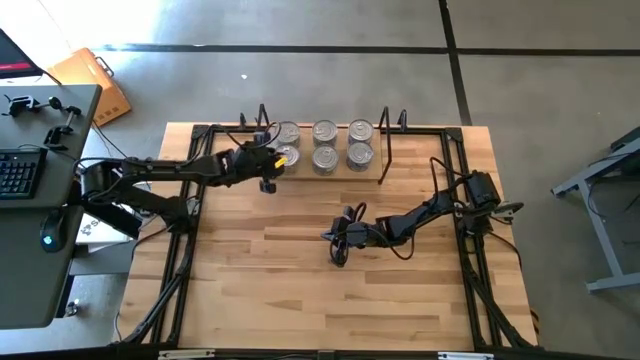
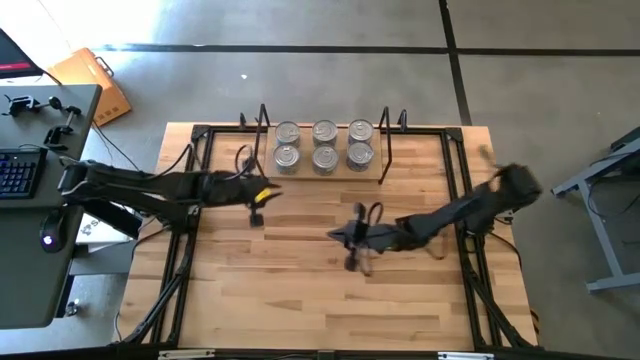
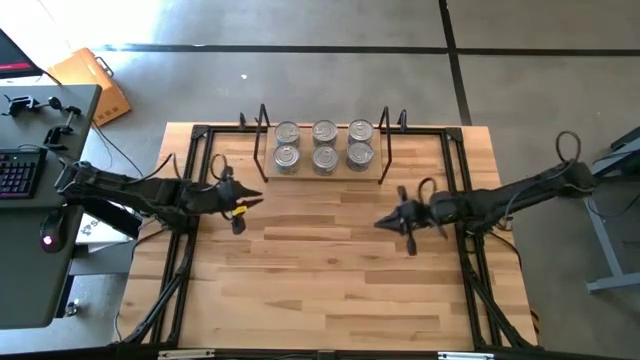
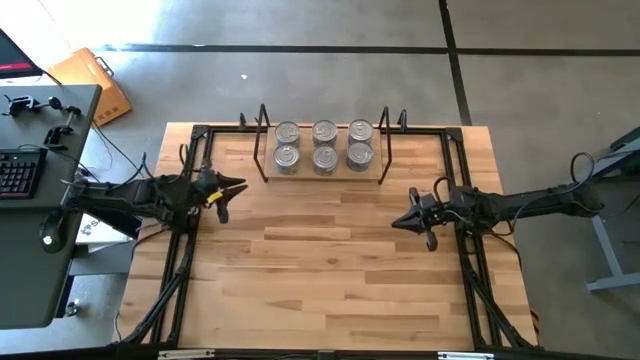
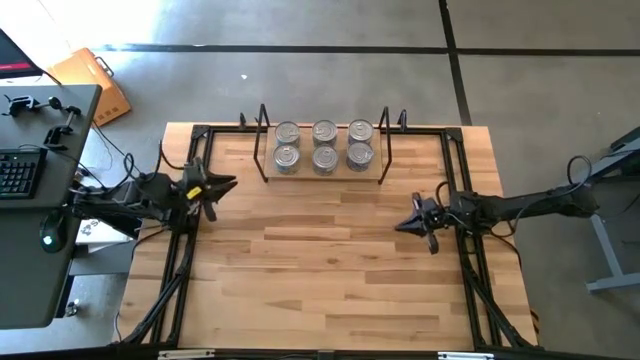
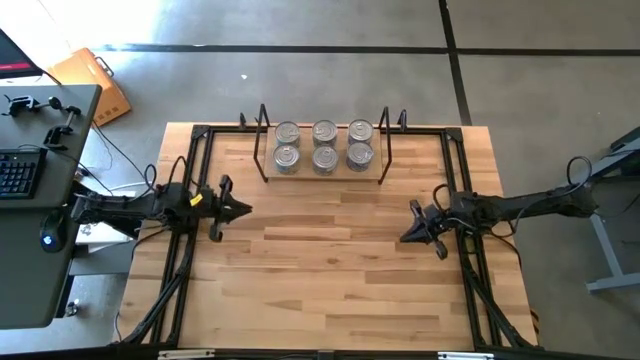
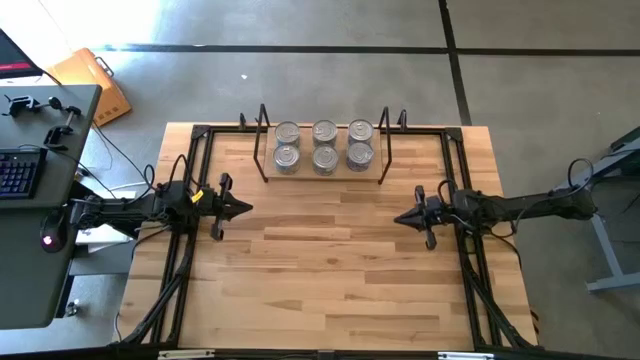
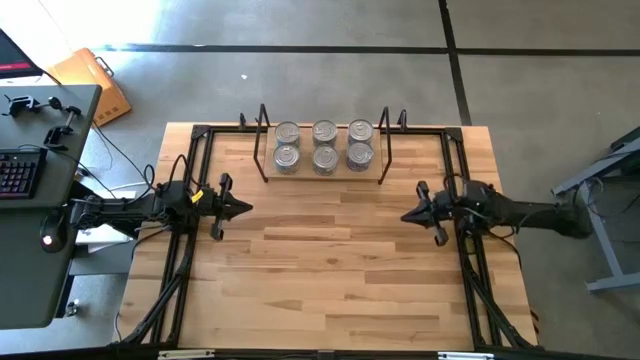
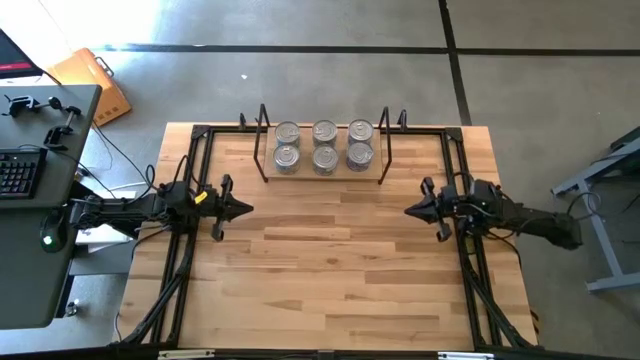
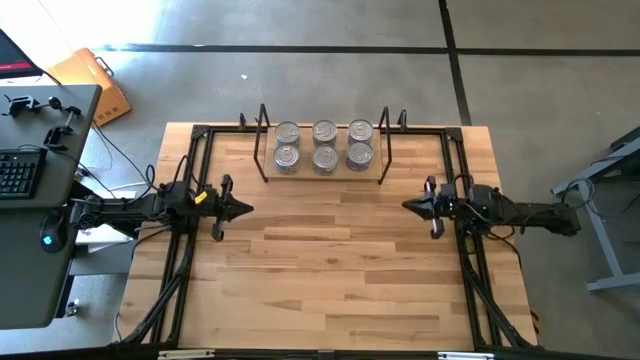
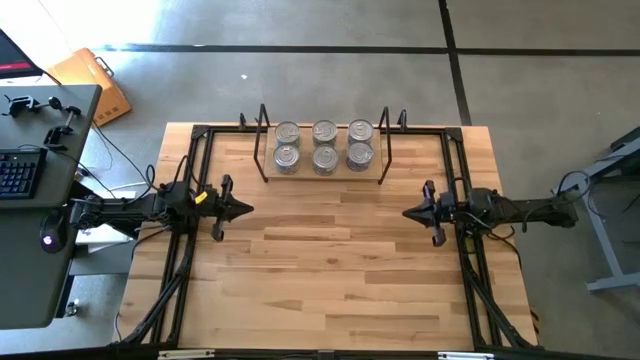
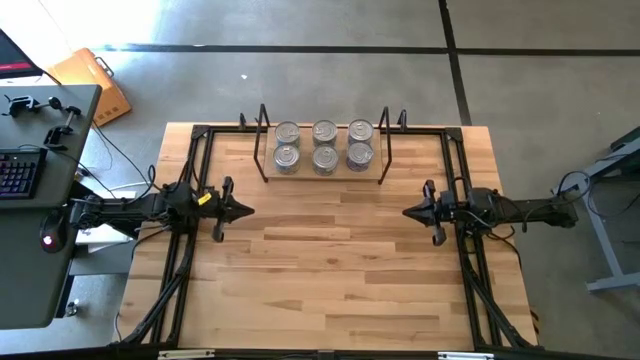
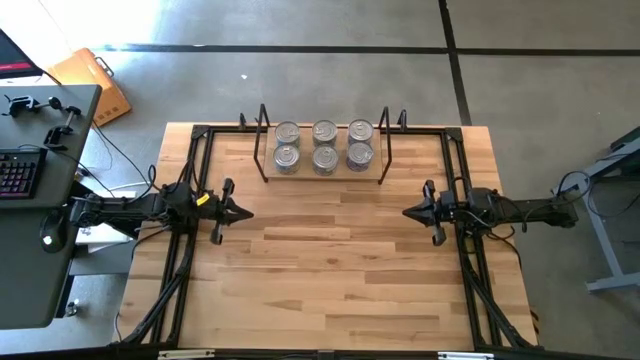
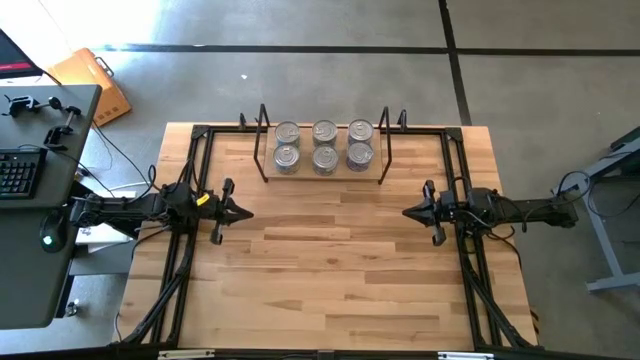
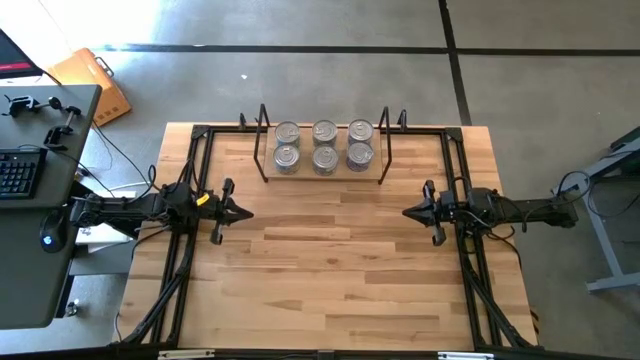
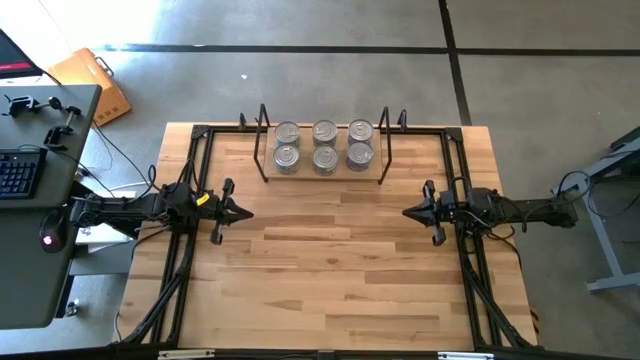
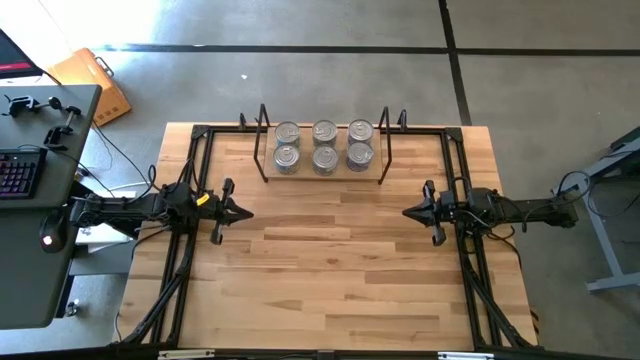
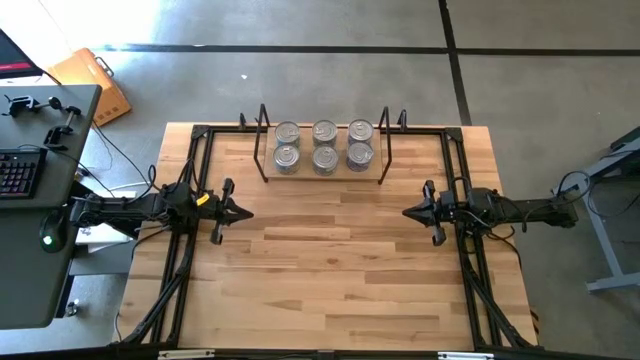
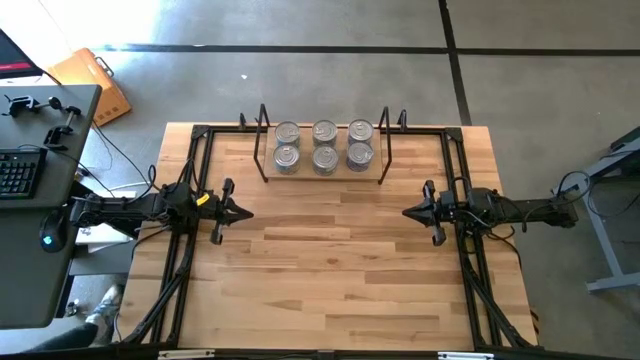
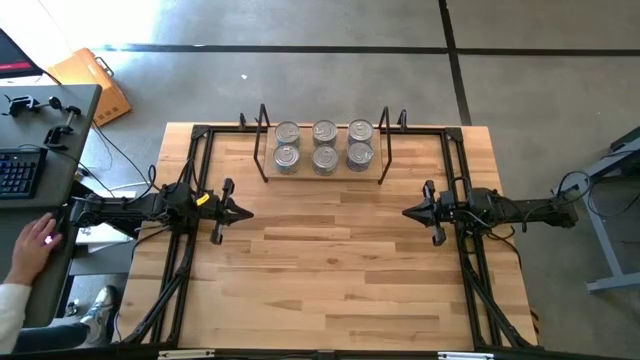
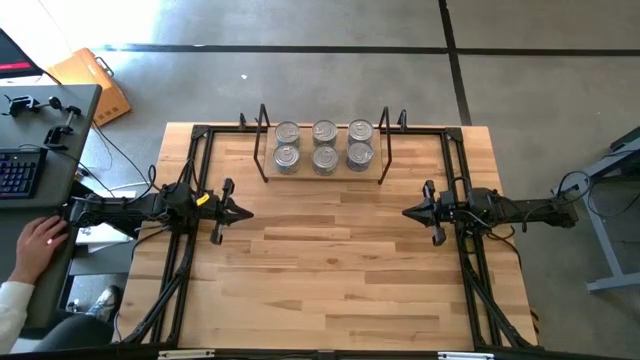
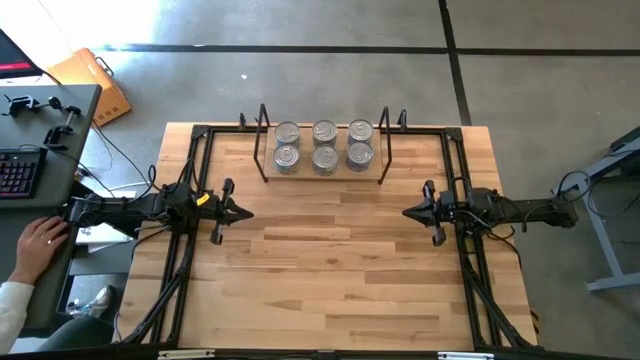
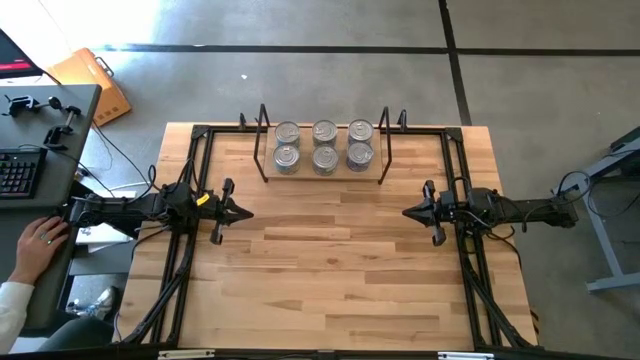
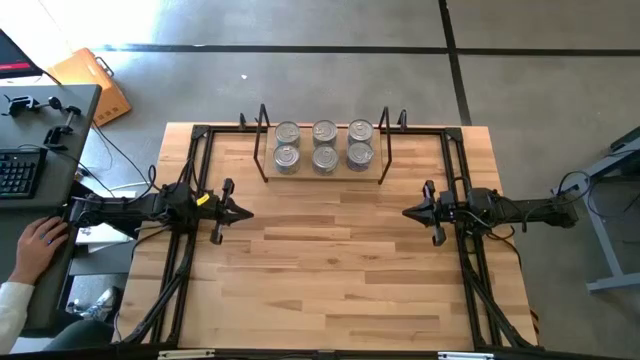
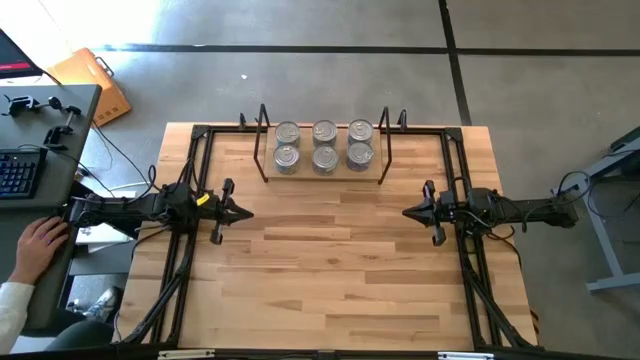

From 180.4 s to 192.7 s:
Task: Stack canned seafood by type on shelf
Return to Home Position

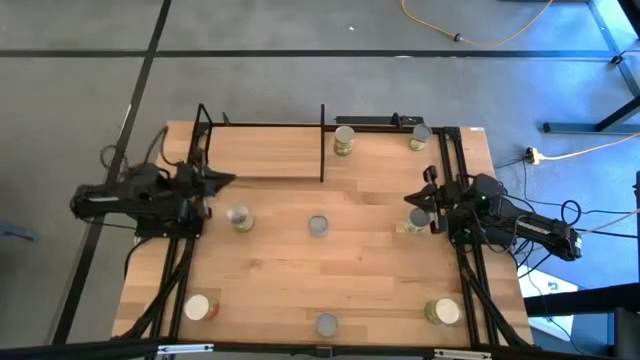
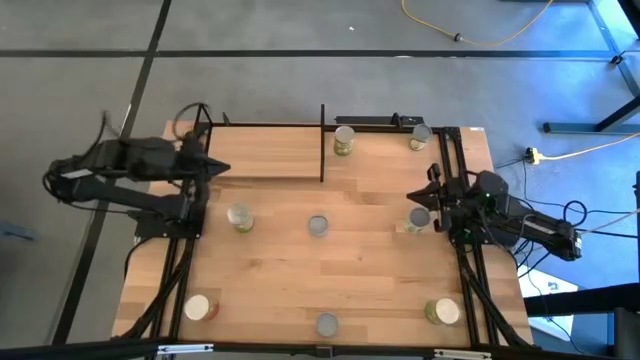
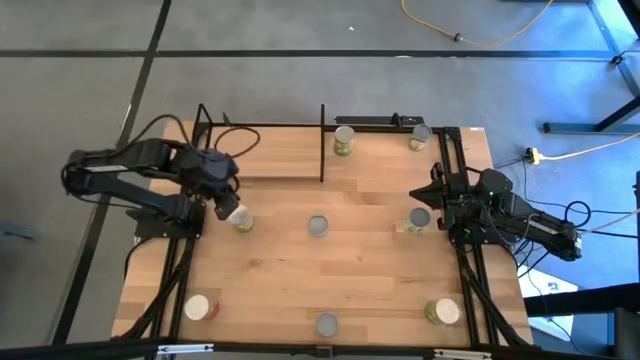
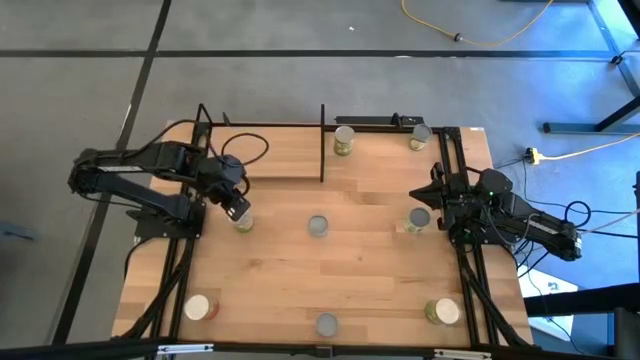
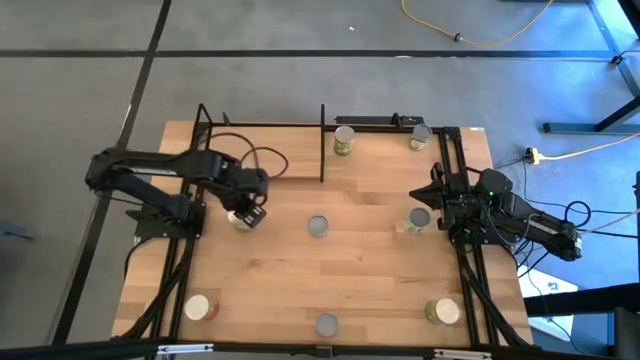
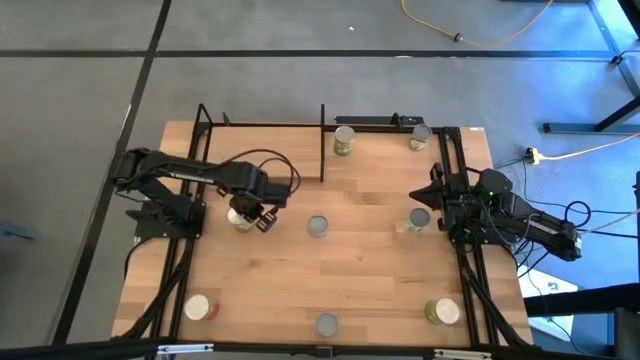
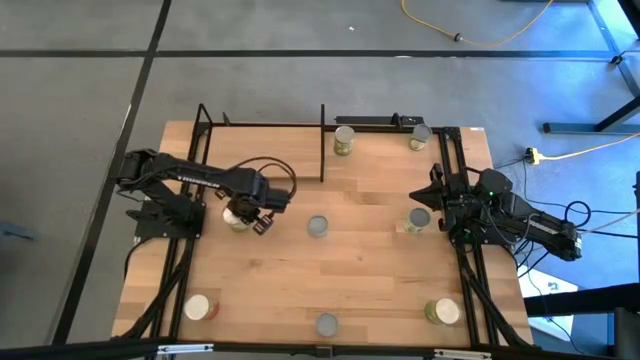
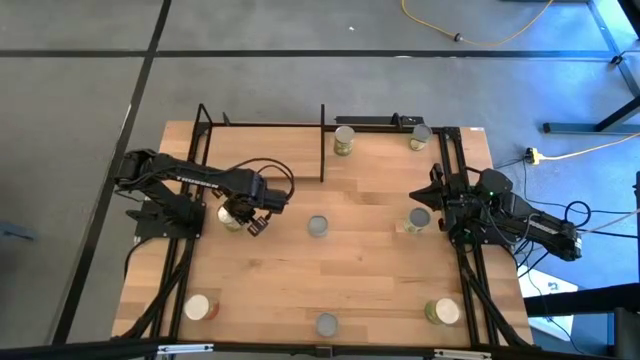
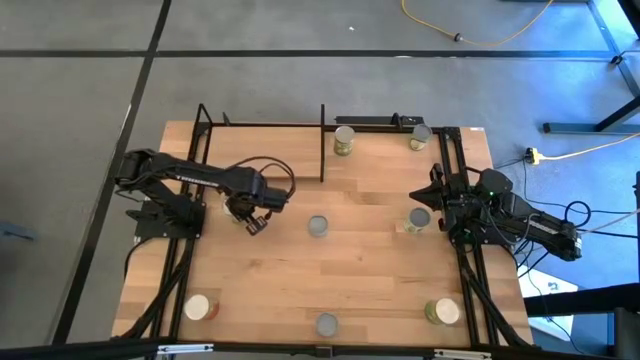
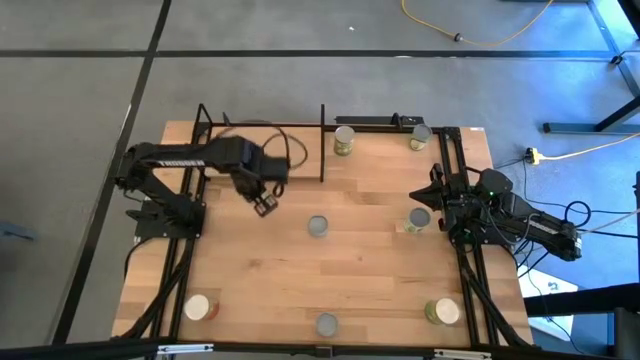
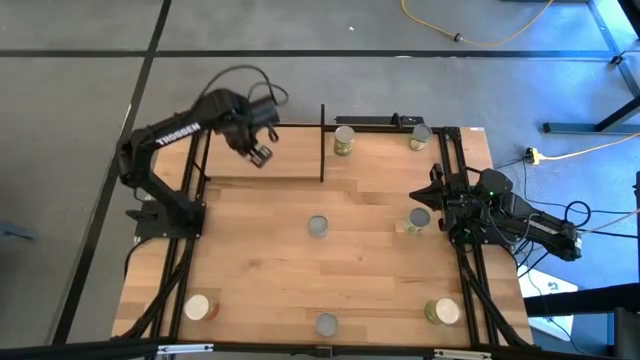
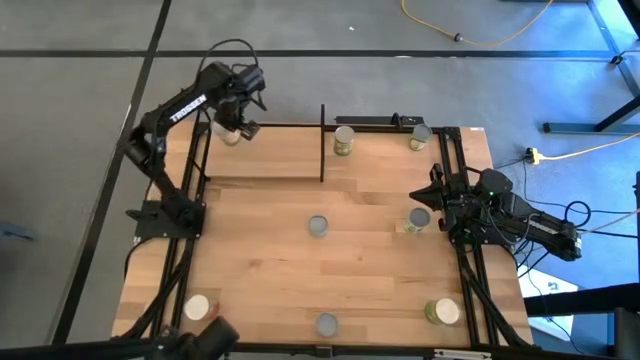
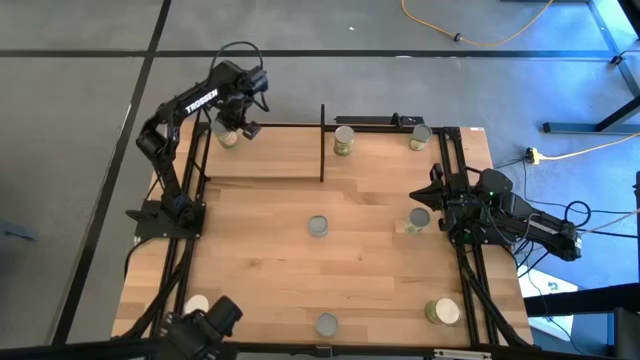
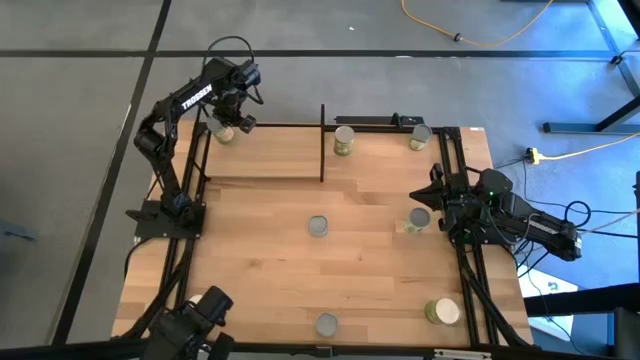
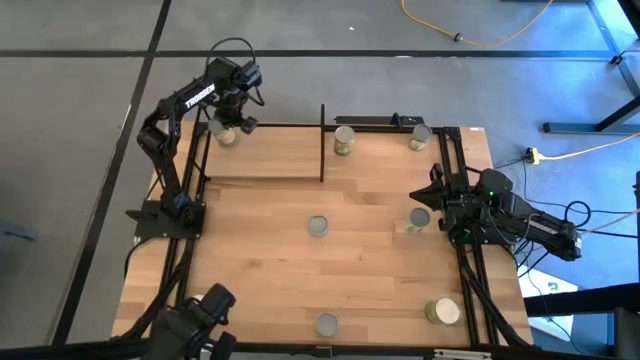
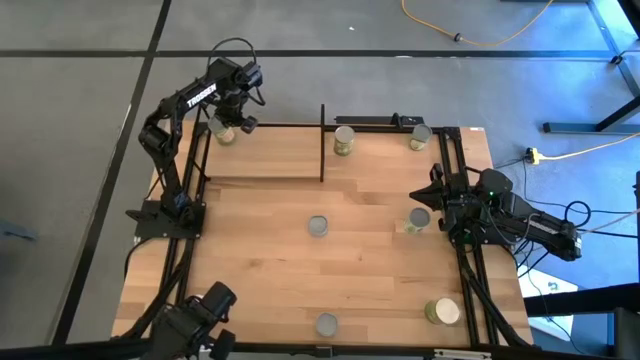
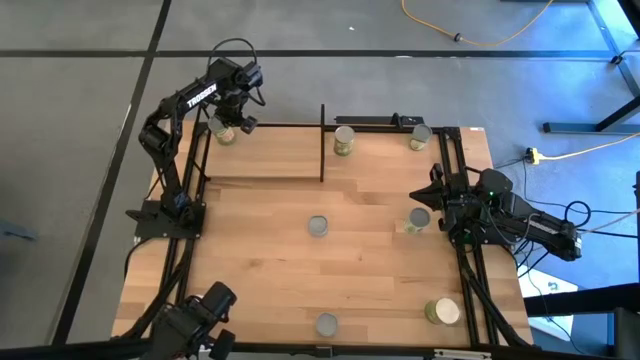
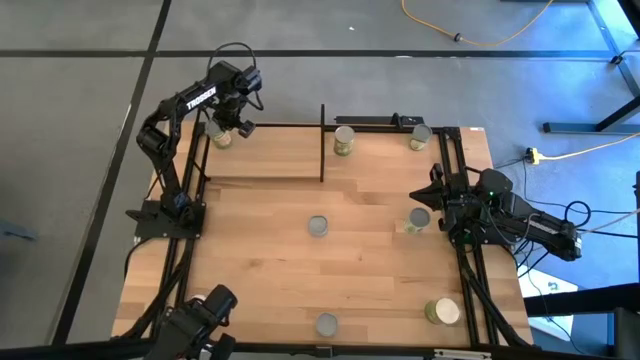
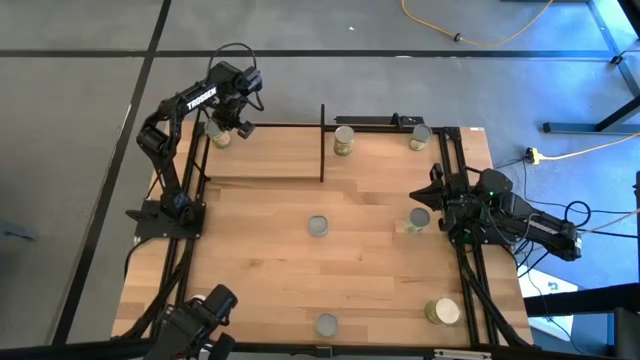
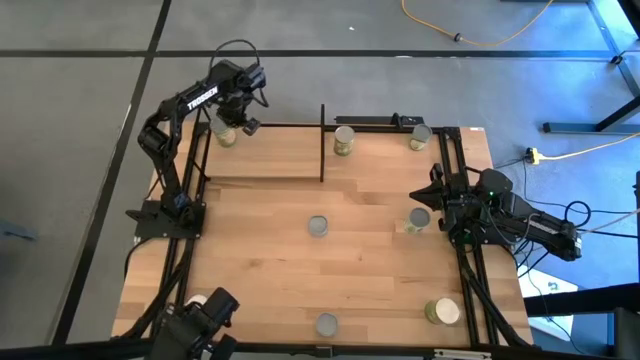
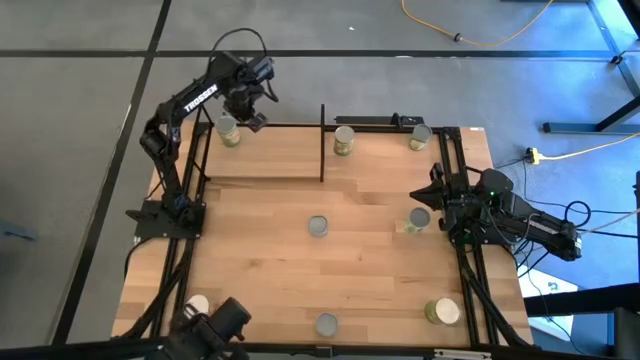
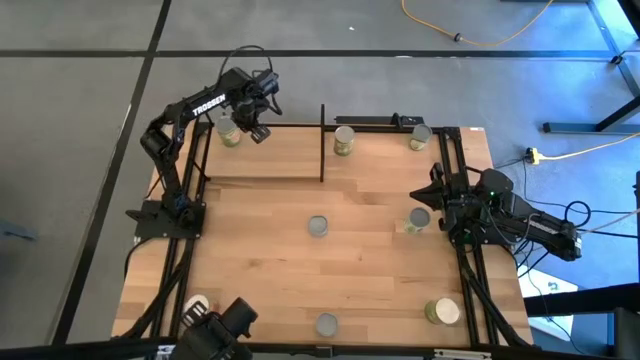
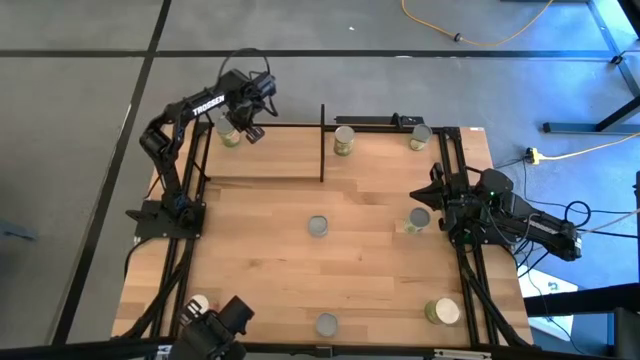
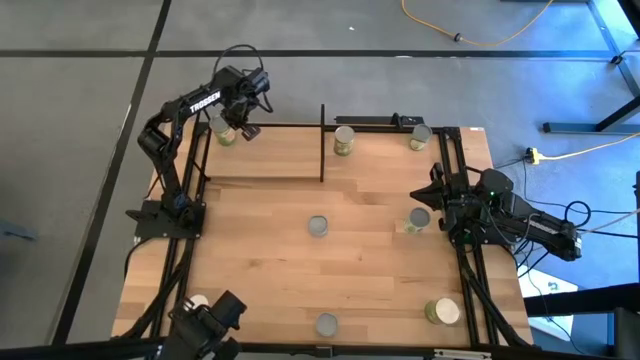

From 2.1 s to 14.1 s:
Task: Pick and place cans onto a shelf
Put the canned oranges can on the shelf
